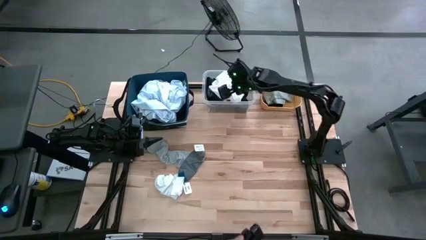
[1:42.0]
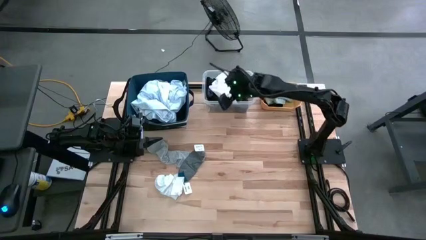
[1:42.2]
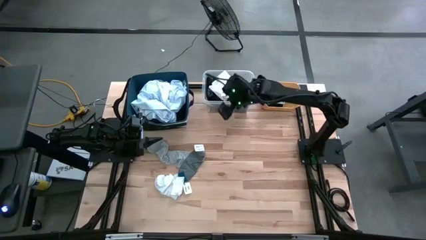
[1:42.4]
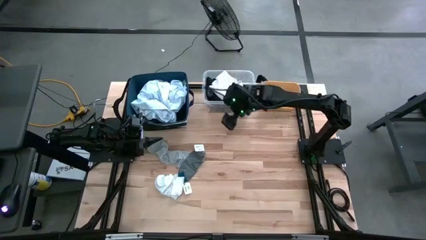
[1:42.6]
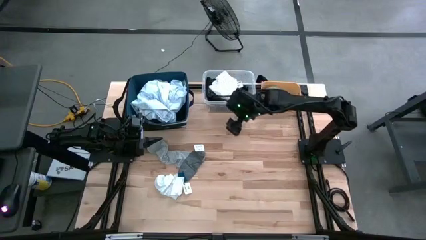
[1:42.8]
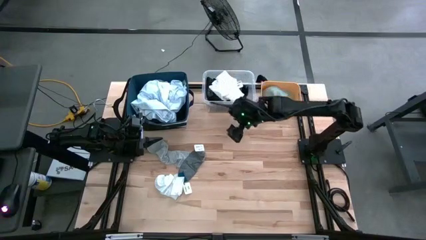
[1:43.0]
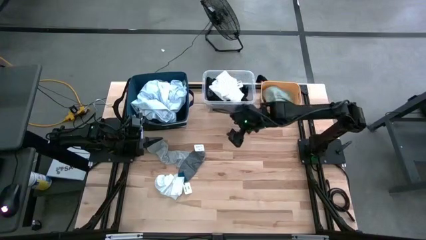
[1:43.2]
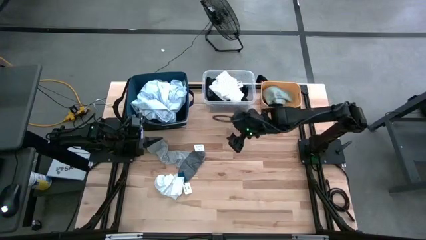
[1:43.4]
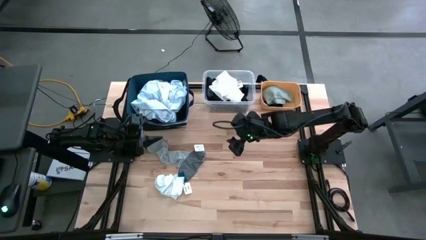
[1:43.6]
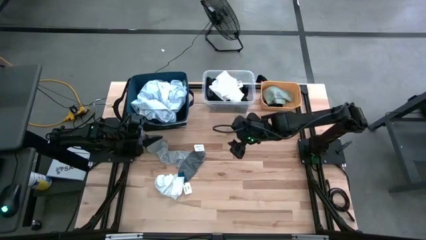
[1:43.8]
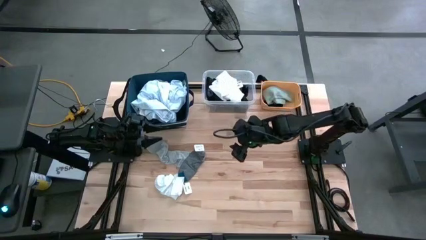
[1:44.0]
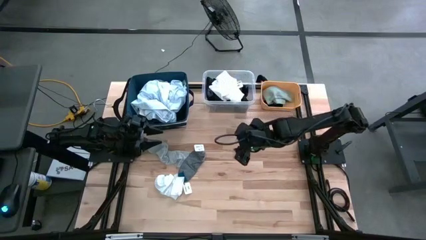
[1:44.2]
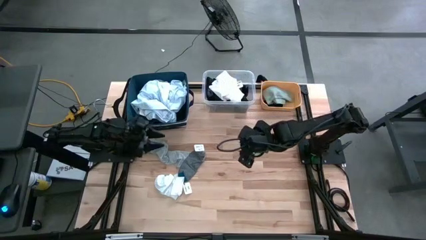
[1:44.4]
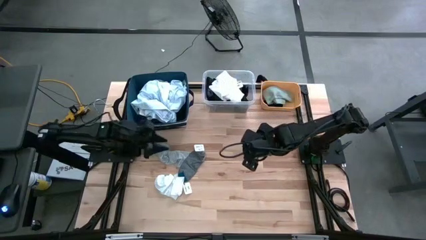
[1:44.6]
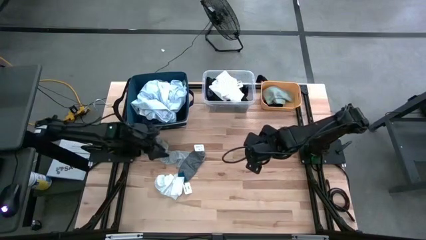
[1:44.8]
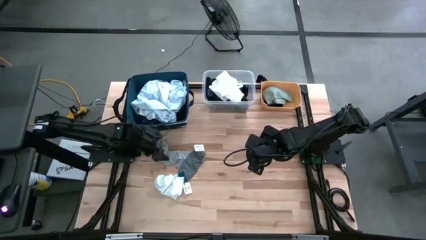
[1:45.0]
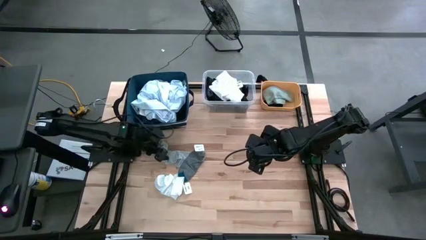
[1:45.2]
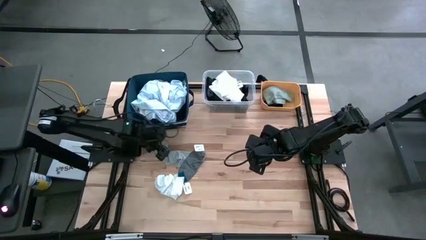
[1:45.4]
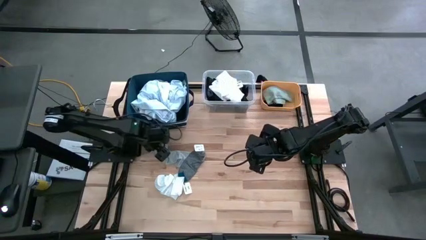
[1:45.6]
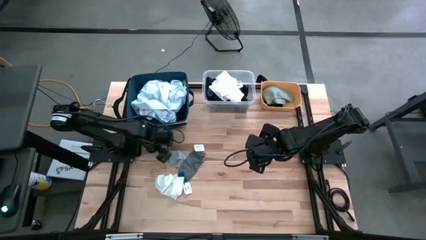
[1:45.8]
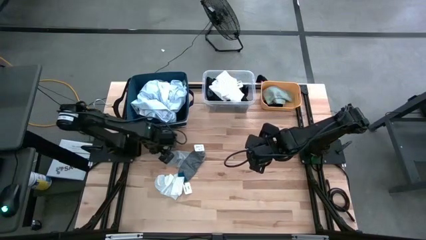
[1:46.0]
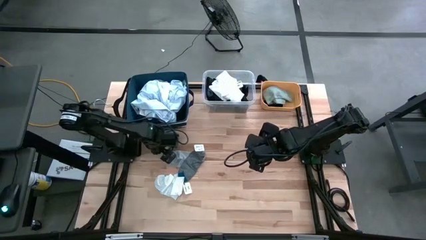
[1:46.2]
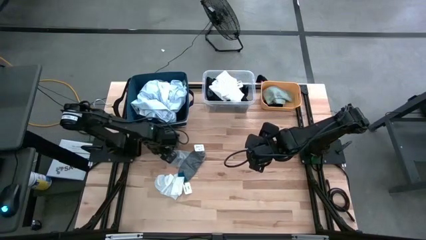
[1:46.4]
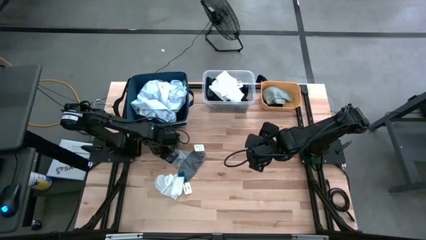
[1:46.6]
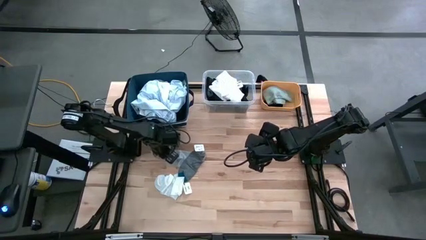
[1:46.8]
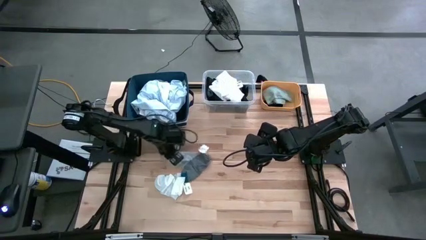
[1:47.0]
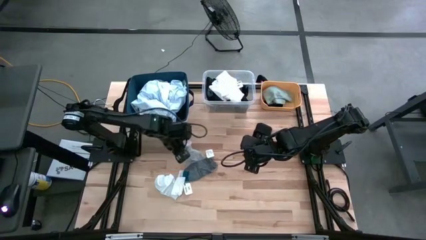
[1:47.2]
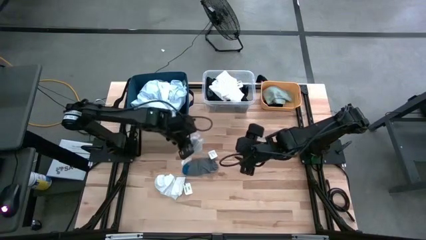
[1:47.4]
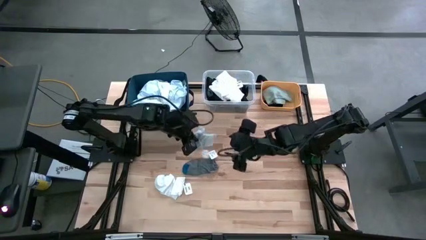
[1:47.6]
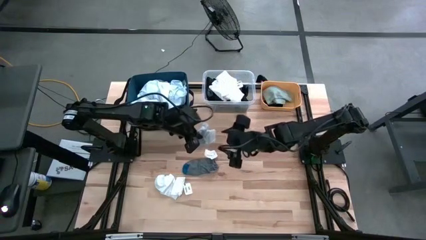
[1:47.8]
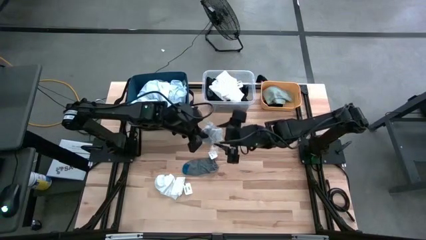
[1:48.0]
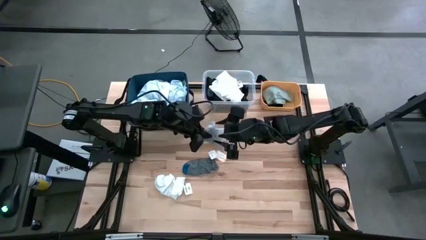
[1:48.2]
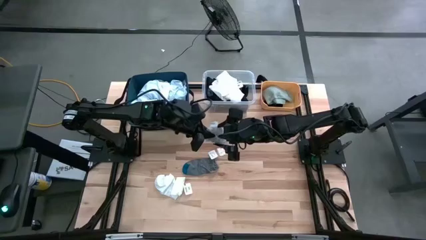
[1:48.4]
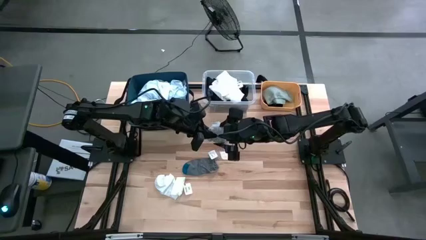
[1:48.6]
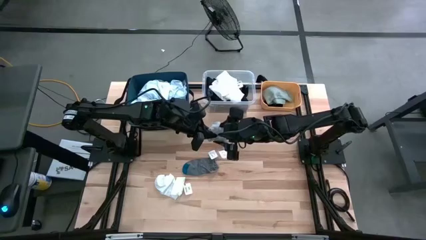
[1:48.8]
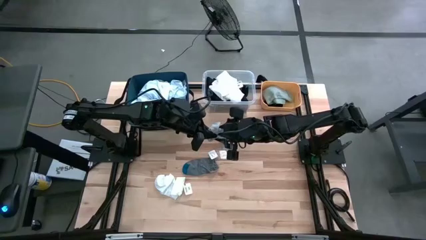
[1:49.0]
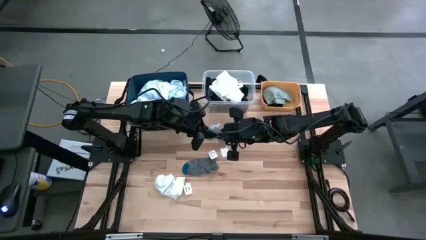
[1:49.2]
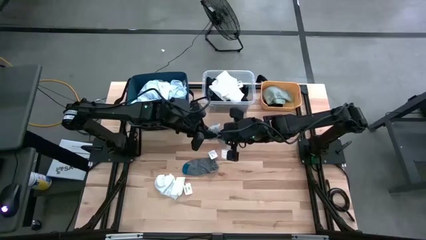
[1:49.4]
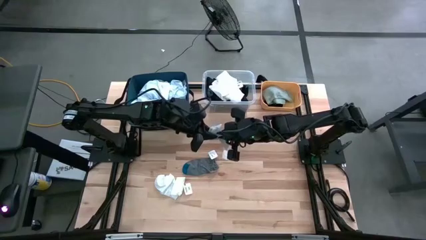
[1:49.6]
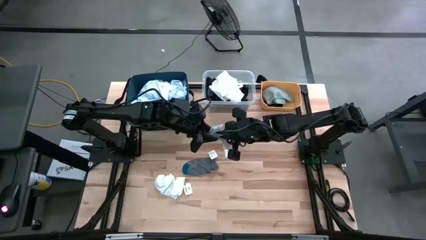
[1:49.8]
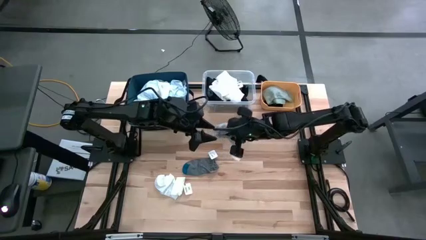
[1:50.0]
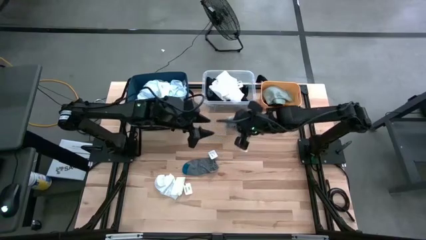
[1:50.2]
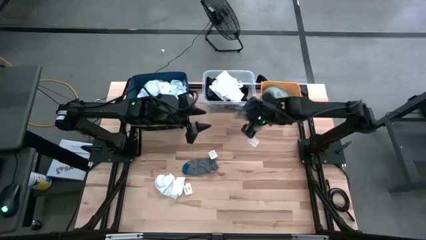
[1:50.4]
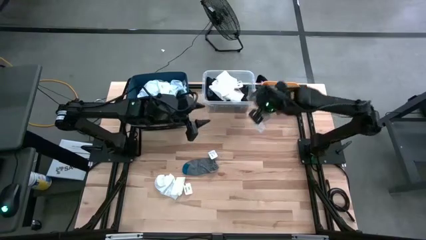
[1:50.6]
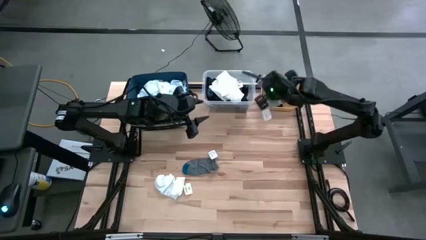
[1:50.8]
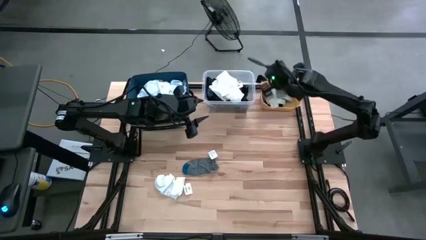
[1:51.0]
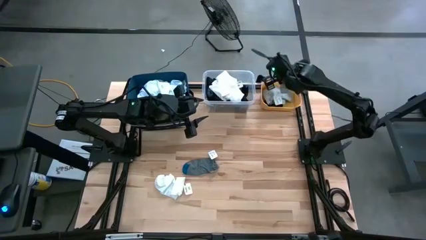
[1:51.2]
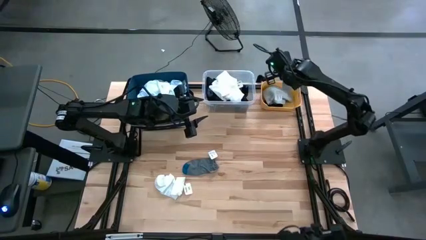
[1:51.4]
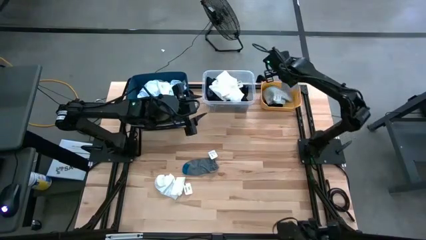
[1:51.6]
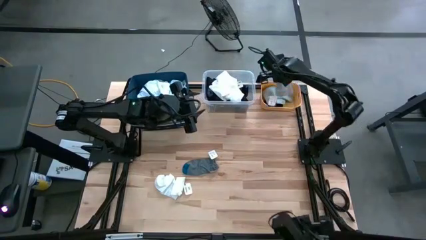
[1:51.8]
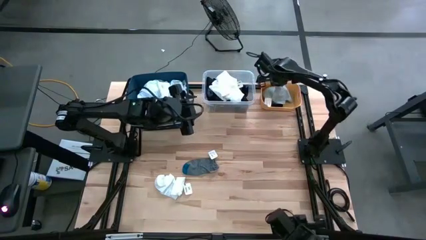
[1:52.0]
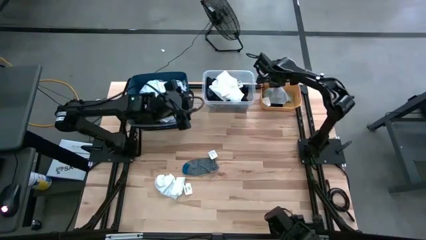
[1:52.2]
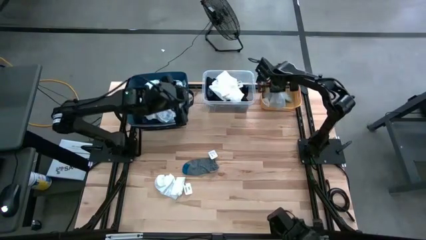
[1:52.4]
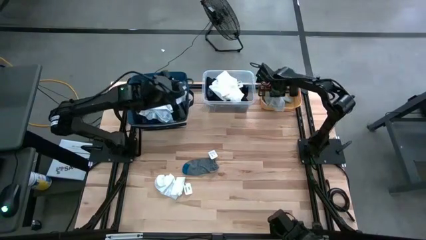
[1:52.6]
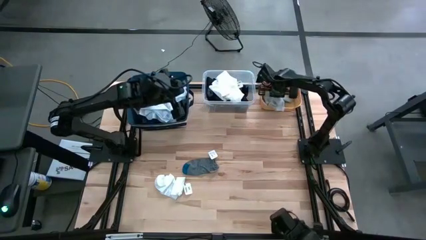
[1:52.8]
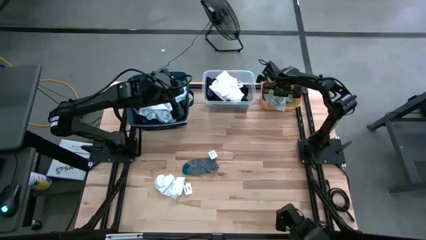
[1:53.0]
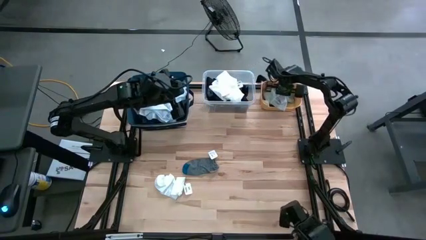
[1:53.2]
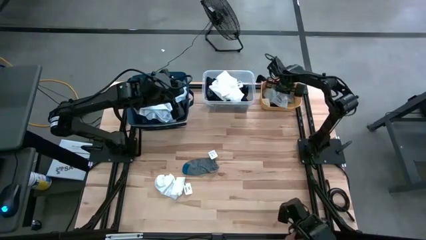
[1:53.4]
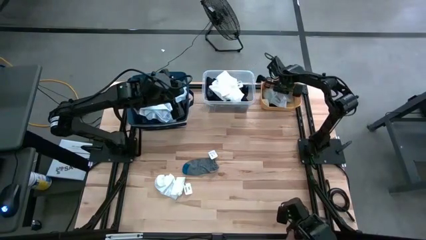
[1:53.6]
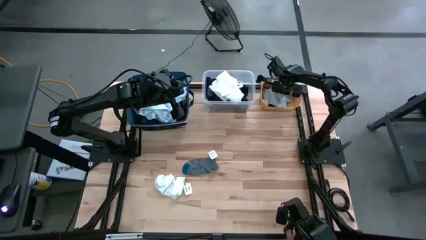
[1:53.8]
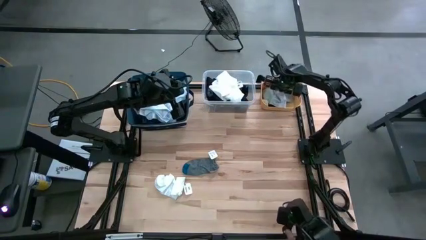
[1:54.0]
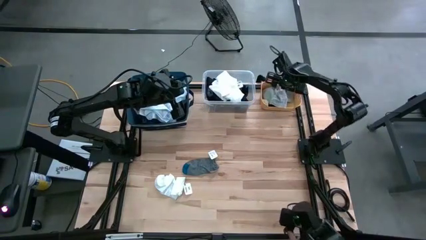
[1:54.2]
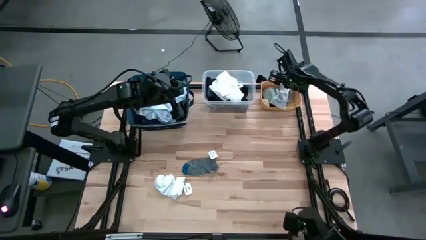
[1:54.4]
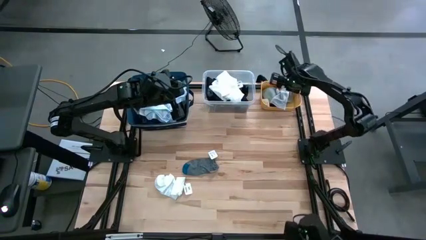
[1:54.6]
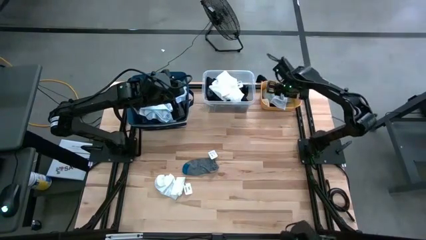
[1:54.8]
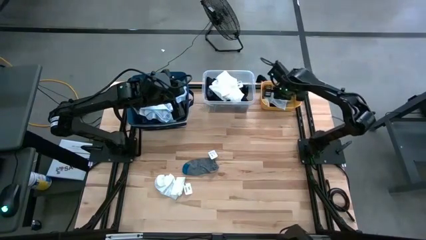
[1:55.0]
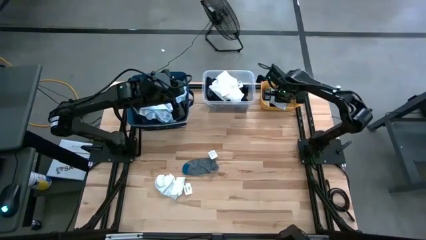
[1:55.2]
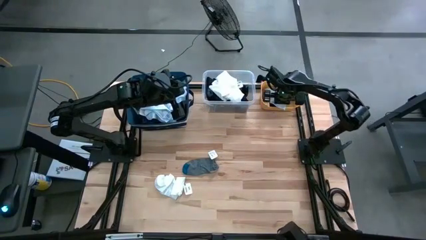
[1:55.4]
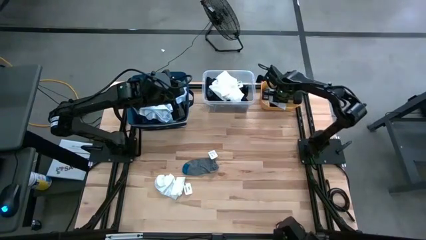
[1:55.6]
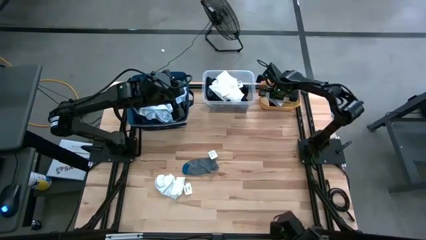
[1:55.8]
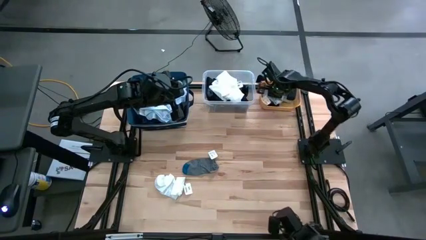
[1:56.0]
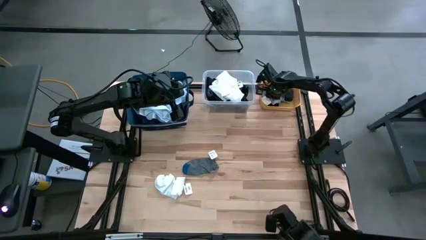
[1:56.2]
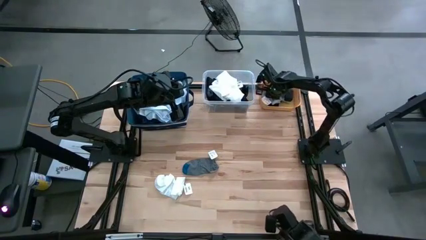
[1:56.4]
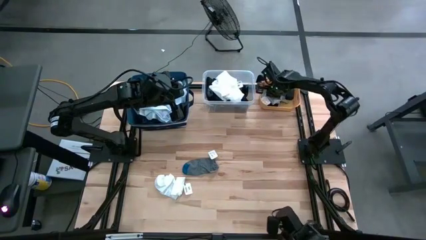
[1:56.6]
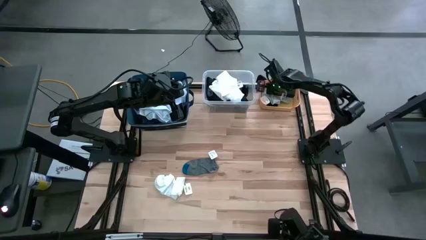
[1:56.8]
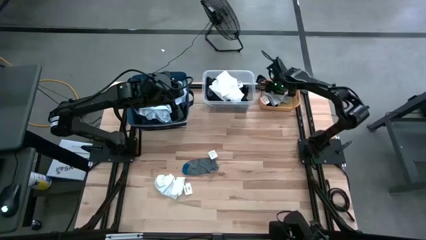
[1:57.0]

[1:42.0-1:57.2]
Task: Pick & Place Cloths
Put the gray sock into the yellow bin
